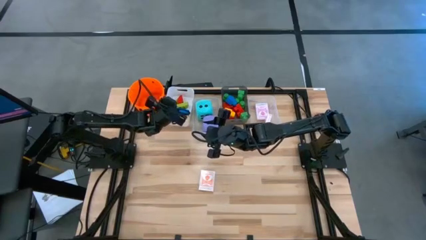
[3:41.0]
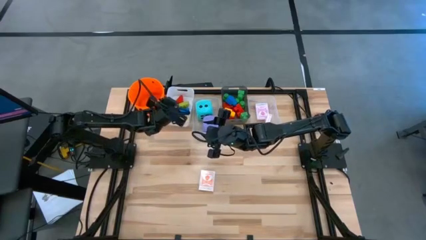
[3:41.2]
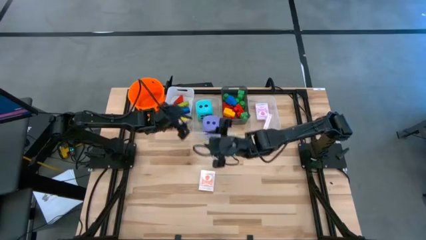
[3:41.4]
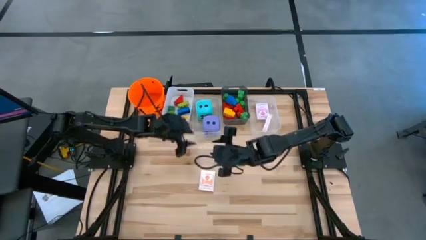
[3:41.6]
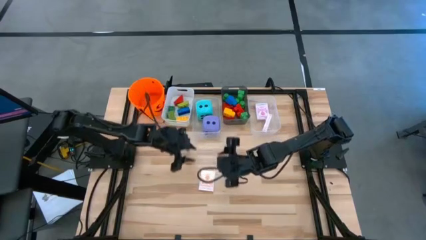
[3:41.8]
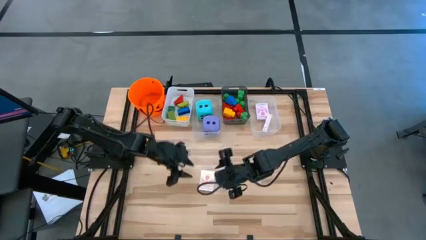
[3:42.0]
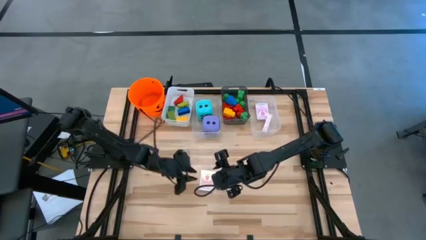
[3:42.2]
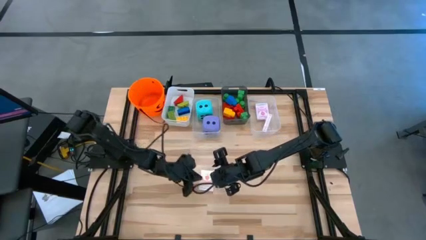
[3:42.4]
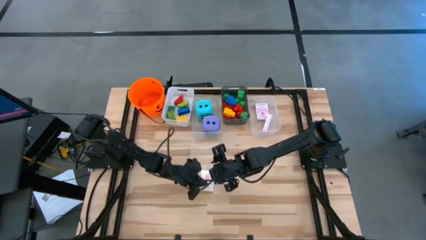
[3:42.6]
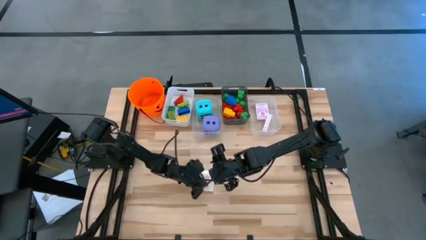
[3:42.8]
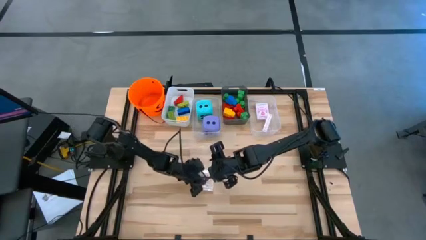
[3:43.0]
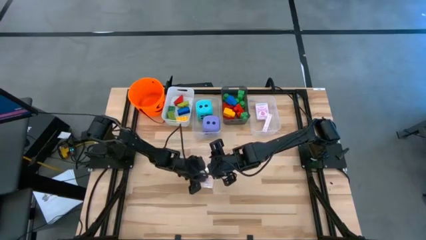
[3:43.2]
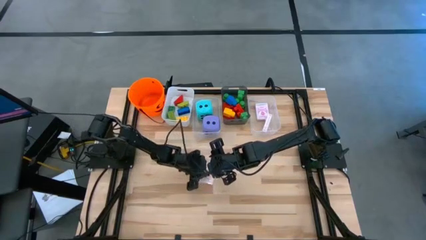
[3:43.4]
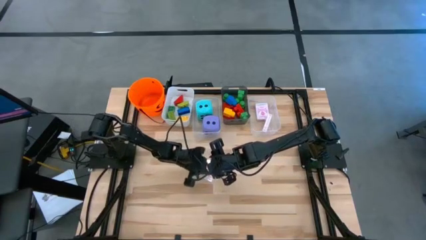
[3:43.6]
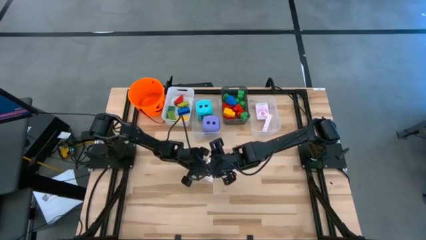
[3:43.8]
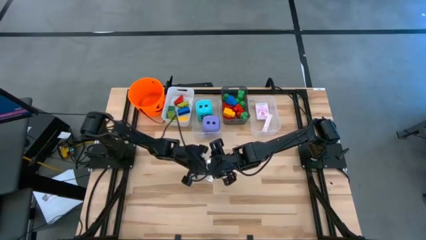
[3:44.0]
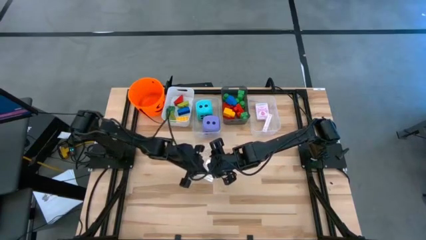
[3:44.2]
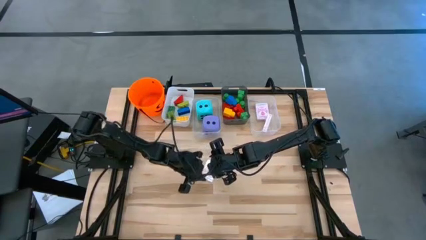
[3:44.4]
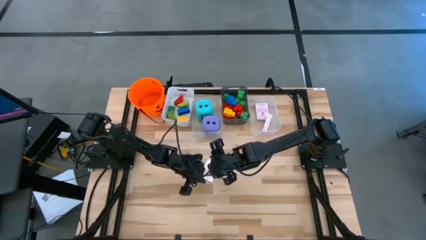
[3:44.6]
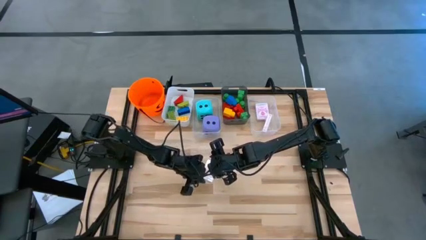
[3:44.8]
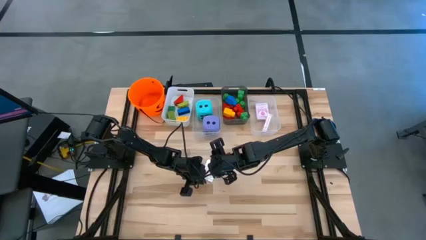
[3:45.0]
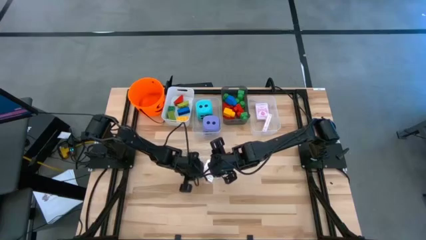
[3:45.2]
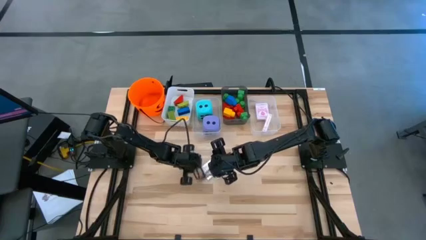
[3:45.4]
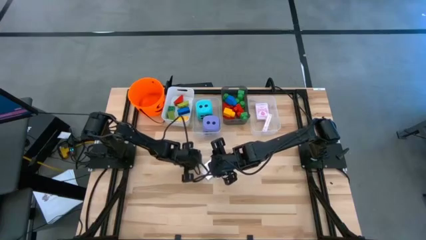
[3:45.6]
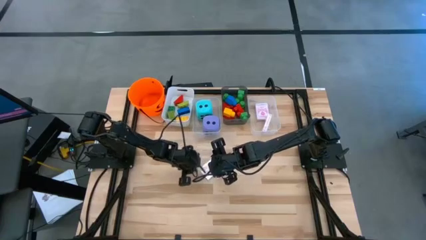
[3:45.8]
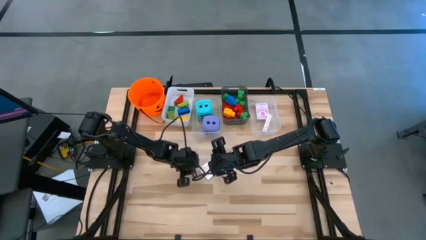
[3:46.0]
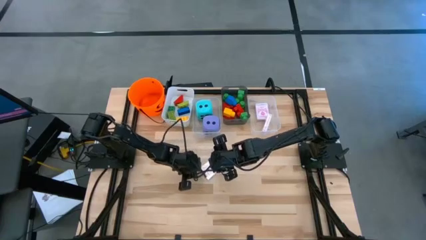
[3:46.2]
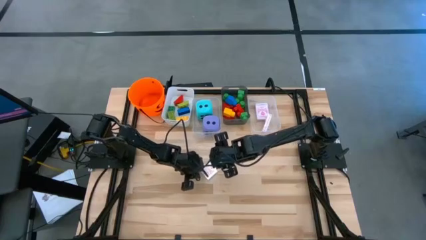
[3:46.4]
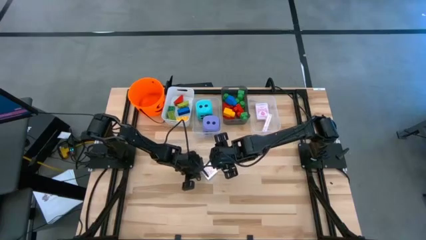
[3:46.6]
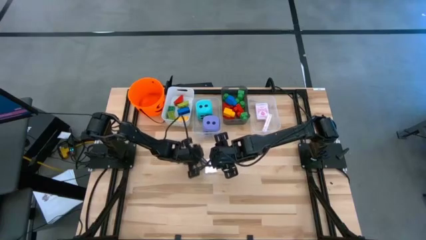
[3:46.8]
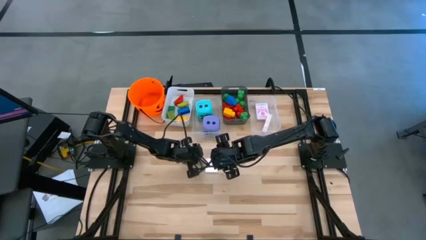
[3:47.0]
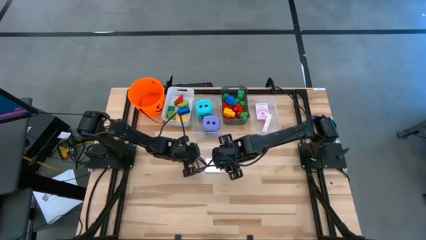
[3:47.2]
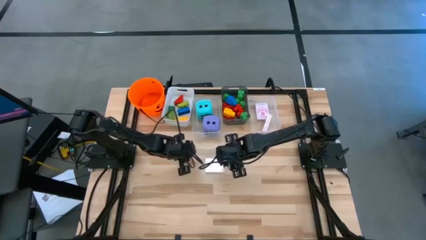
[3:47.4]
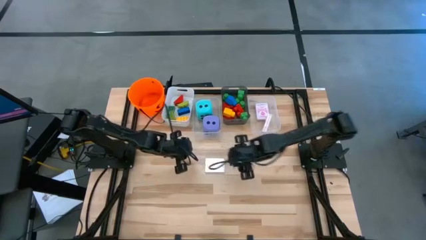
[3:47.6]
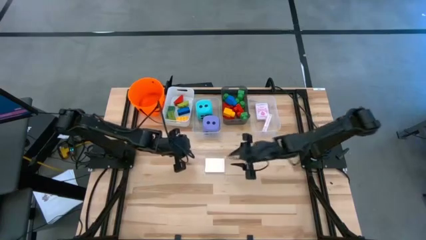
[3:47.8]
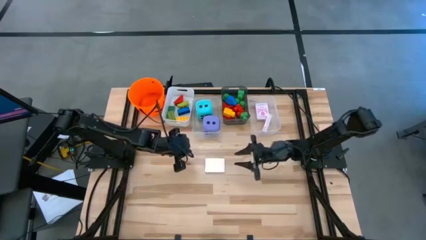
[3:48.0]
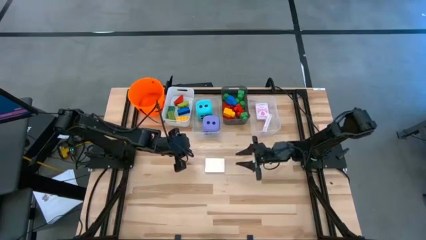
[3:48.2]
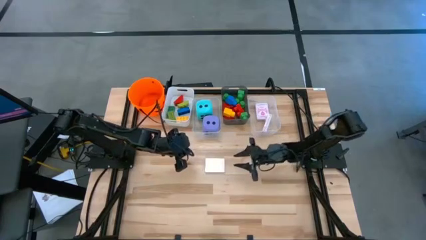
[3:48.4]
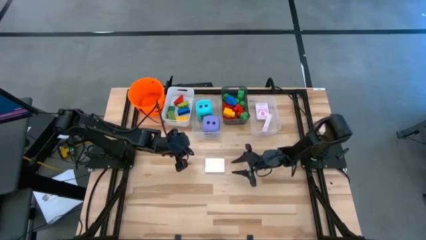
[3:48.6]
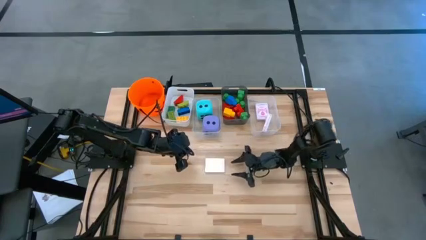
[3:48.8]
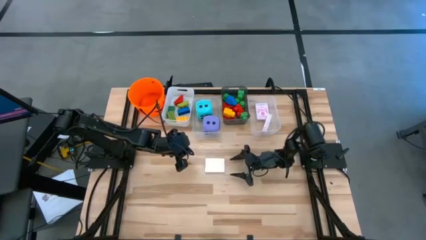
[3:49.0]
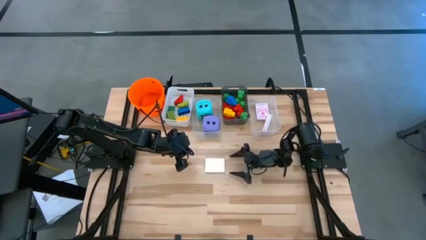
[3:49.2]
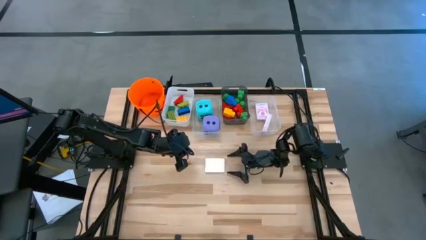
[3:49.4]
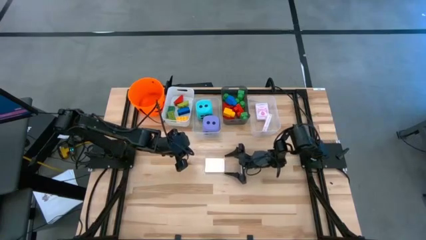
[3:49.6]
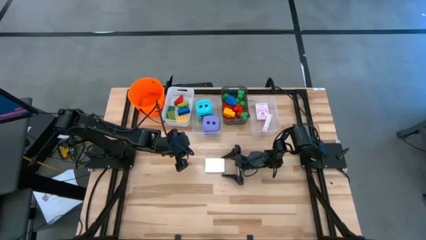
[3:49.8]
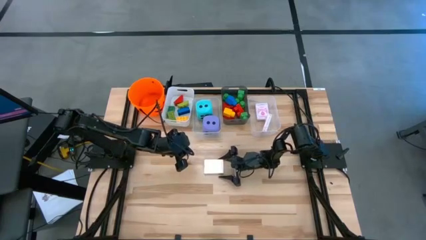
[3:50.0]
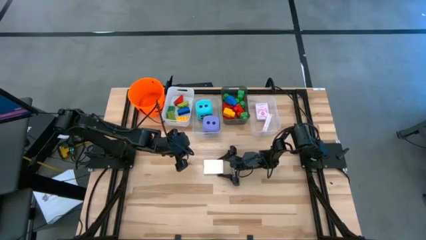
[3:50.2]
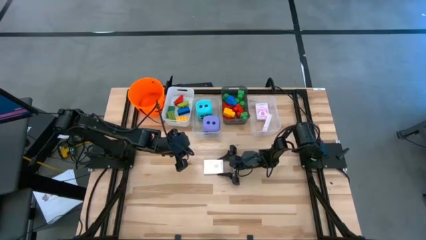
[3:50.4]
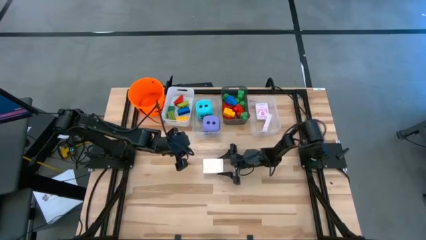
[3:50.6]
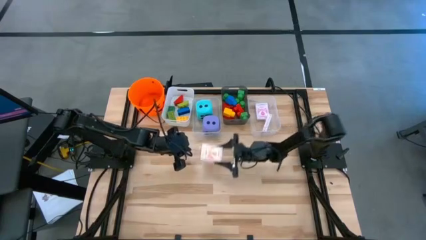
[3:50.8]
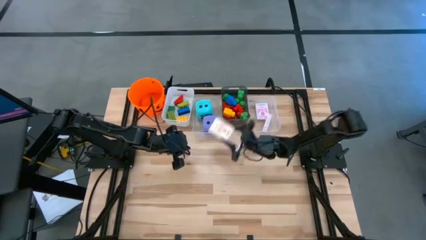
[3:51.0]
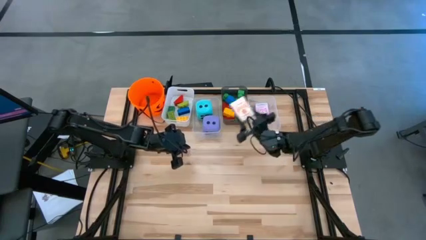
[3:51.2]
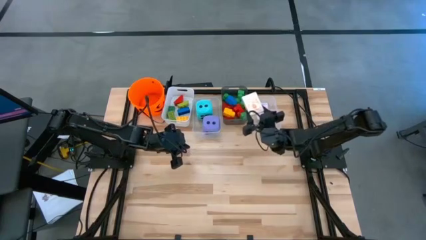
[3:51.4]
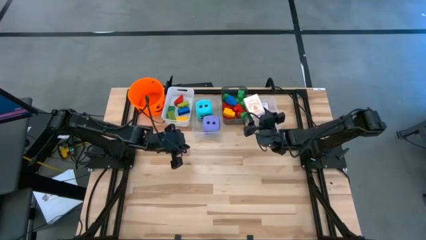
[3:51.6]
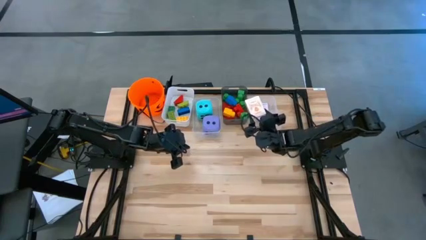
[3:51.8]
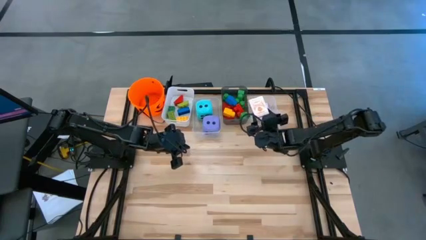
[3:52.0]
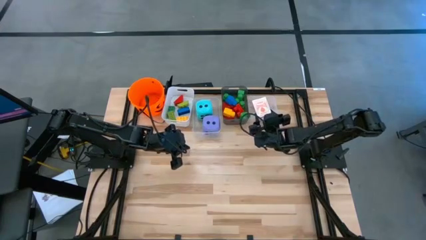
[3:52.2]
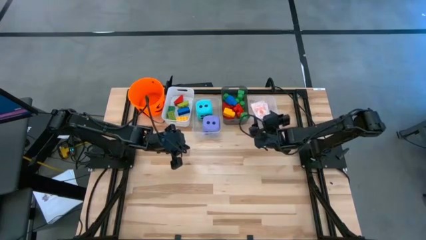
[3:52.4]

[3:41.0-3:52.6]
Task: Pick & Place Toys
Put the orange deck of cards into the right transparent bin

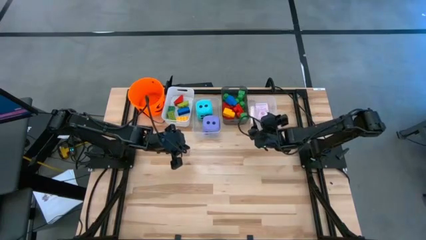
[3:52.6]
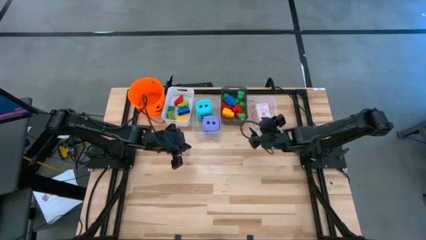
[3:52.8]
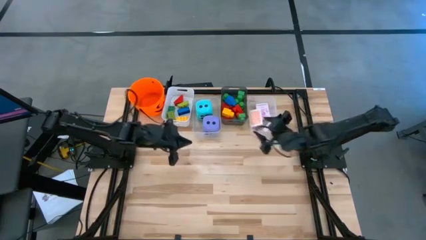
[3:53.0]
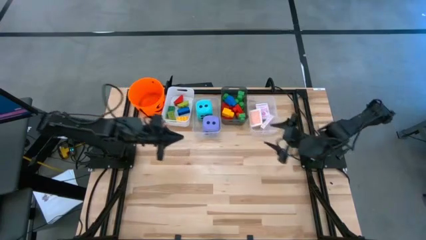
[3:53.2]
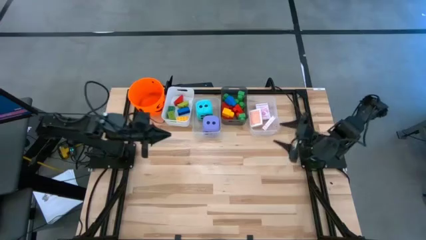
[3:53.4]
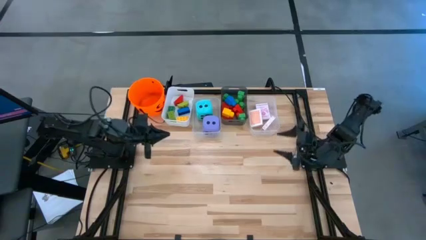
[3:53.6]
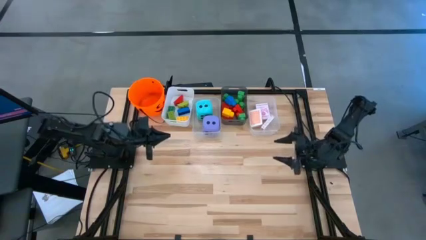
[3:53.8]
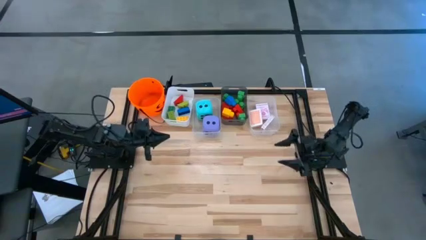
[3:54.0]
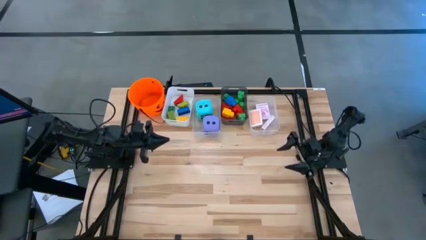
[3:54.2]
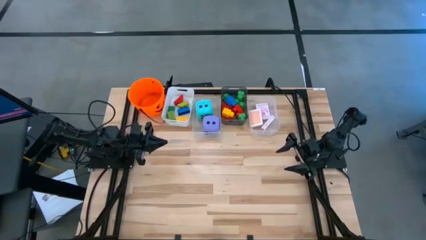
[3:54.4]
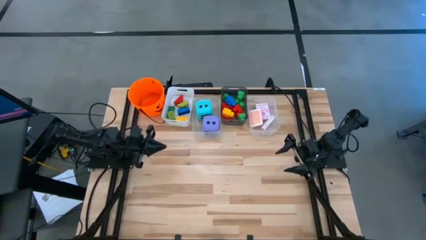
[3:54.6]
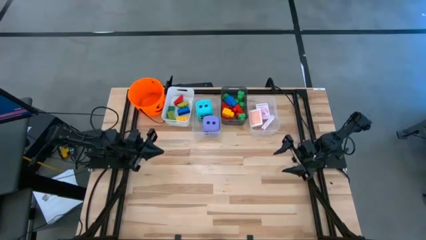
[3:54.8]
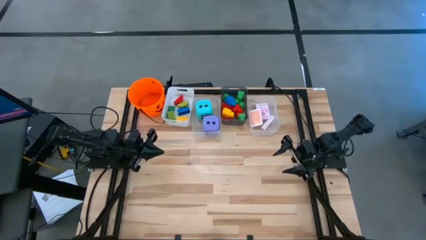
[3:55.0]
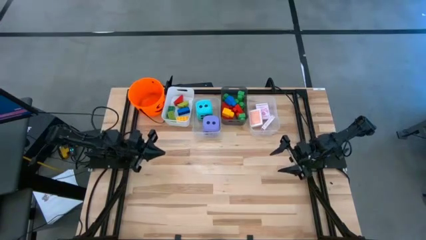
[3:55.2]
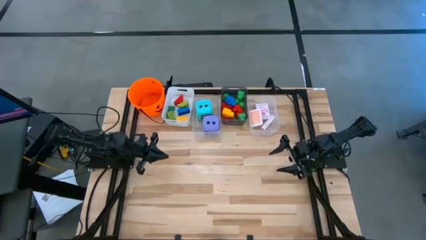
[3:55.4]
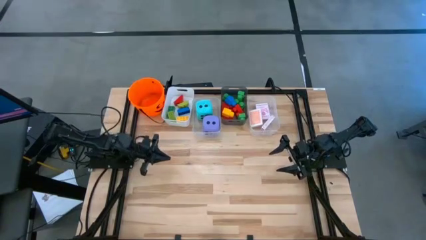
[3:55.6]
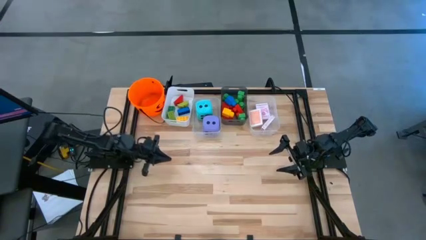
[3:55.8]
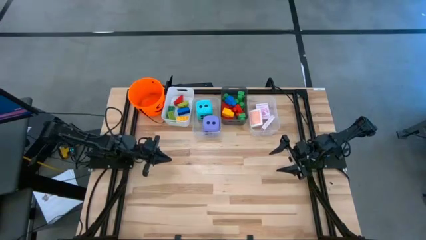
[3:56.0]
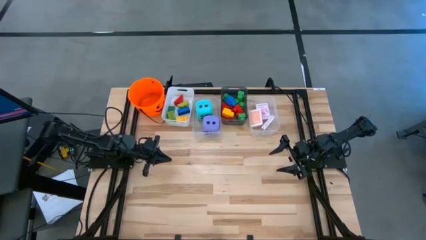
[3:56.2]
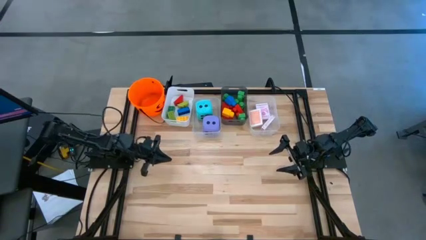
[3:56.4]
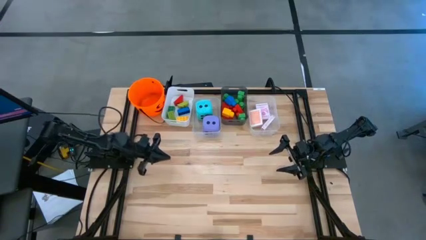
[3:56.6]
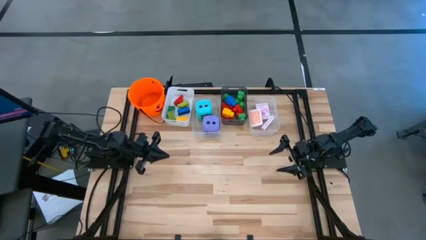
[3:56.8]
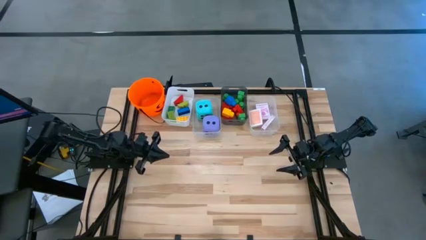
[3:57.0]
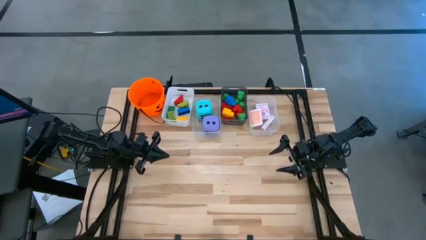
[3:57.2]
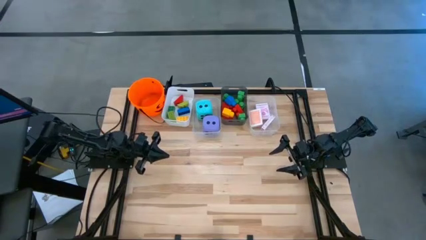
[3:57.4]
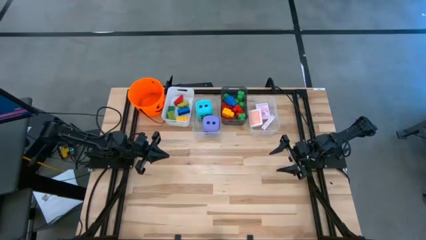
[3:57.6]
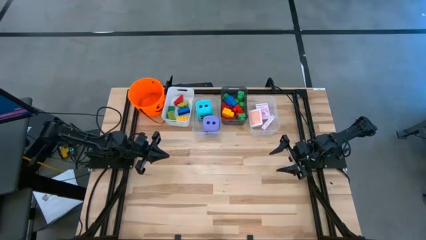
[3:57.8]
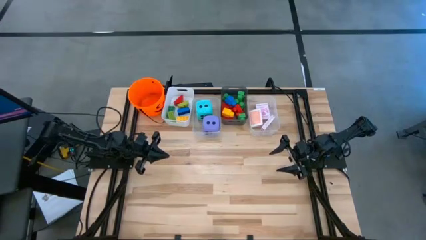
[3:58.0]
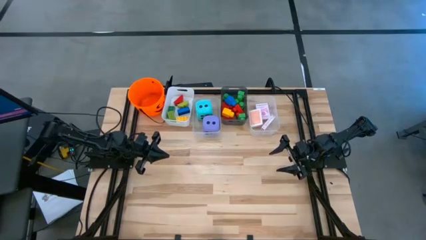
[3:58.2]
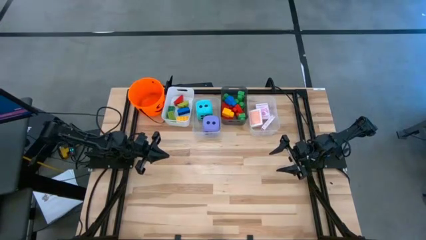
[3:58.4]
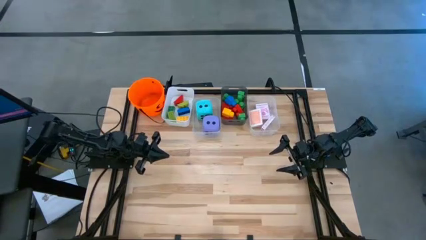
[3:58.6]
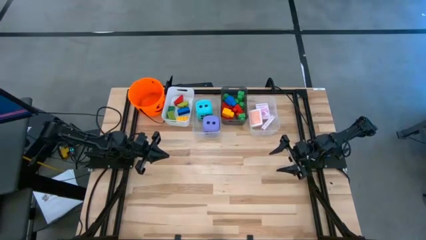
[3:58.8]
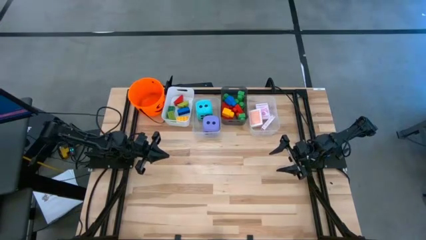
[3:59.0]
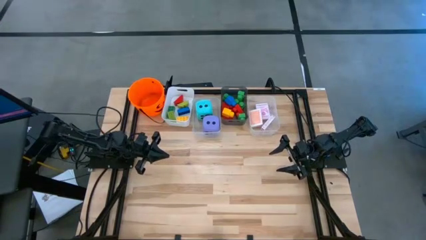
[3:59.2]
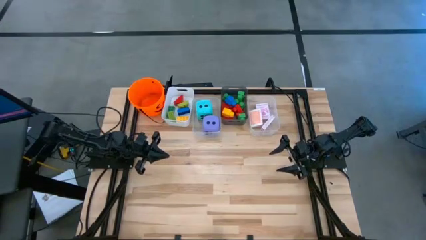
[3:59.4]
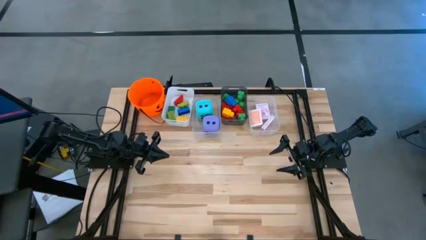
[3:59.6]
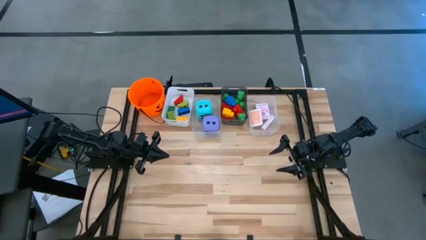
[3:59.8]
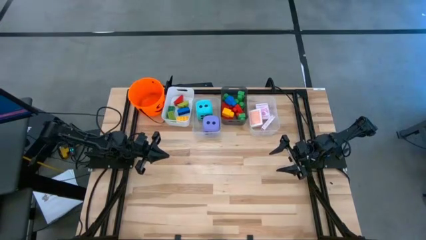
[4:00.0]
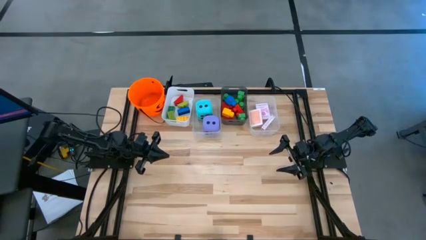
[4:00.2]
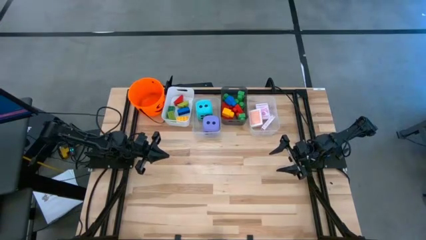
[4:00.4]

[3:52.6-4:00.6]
Return to Home Position
